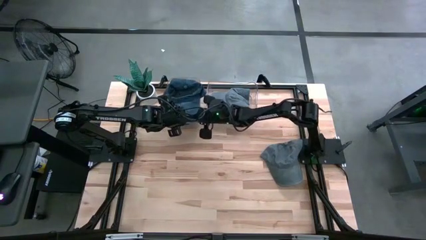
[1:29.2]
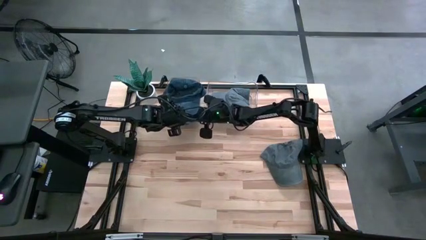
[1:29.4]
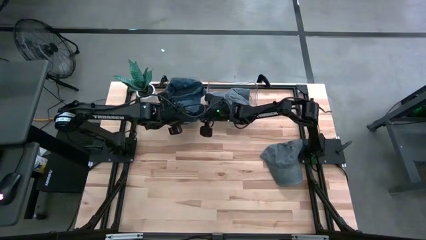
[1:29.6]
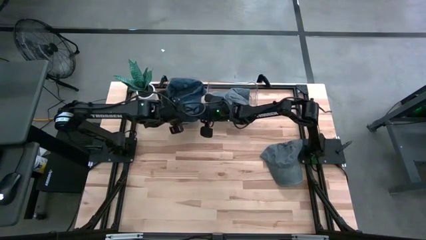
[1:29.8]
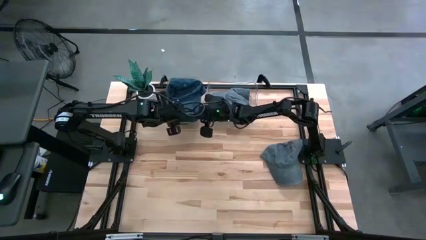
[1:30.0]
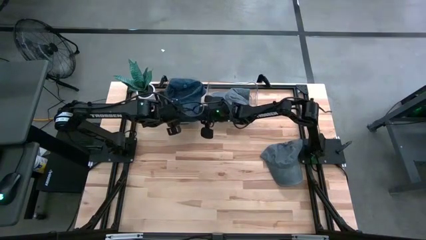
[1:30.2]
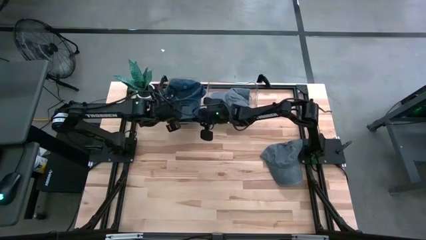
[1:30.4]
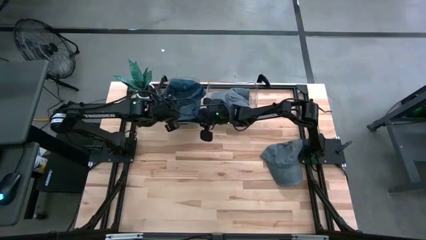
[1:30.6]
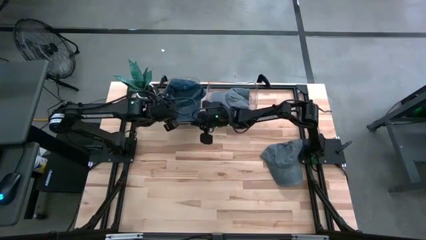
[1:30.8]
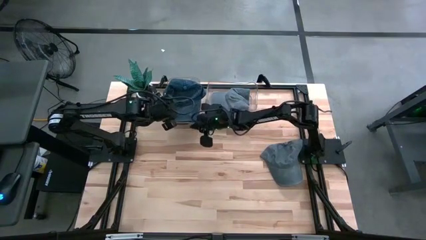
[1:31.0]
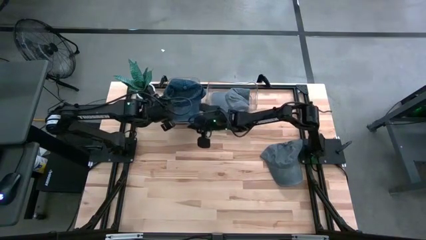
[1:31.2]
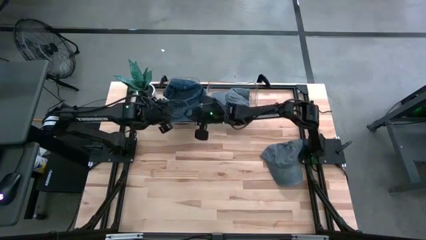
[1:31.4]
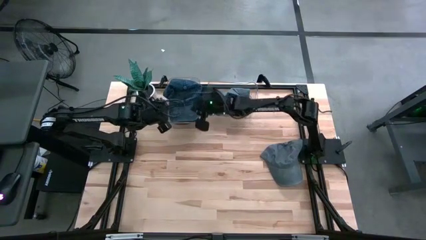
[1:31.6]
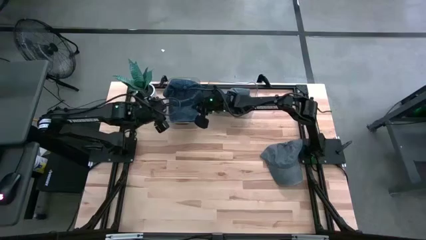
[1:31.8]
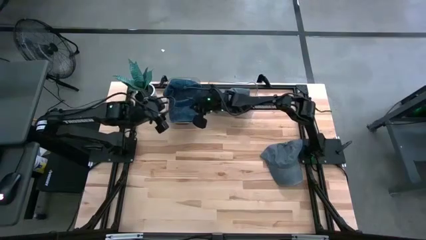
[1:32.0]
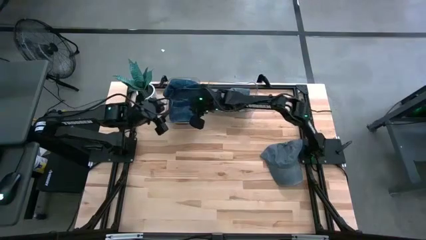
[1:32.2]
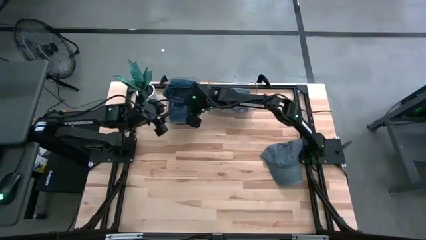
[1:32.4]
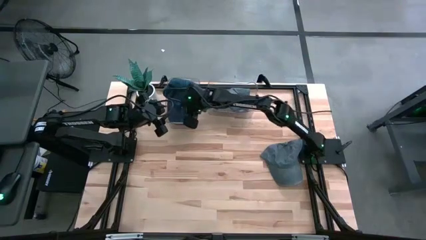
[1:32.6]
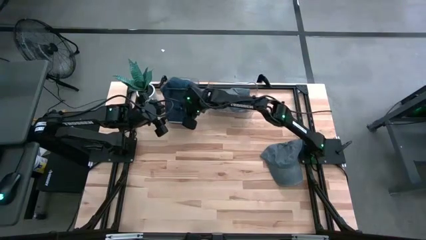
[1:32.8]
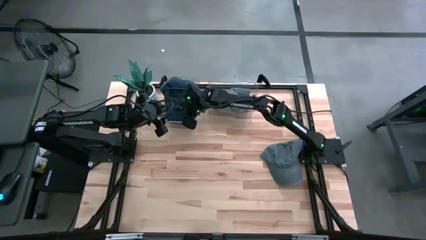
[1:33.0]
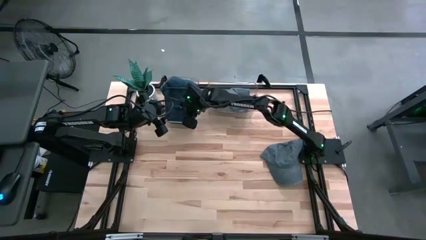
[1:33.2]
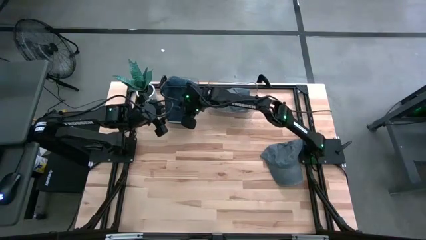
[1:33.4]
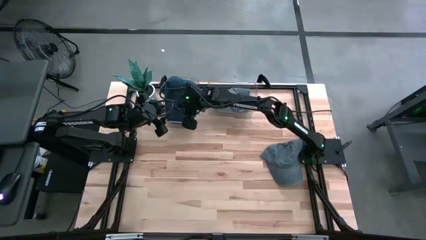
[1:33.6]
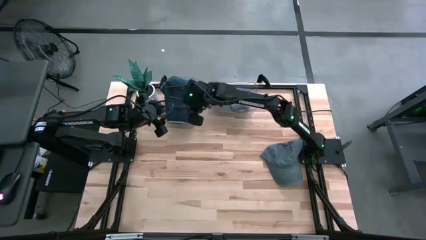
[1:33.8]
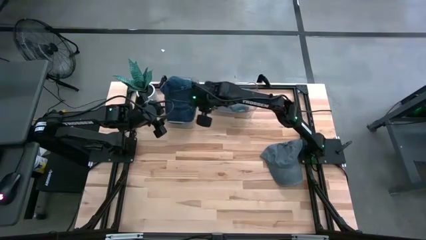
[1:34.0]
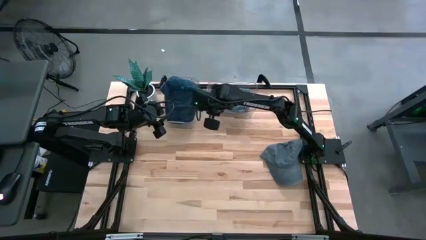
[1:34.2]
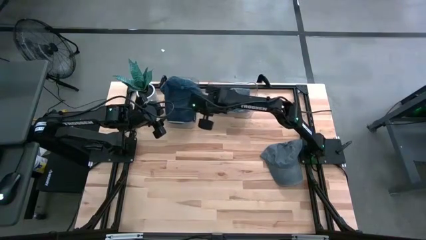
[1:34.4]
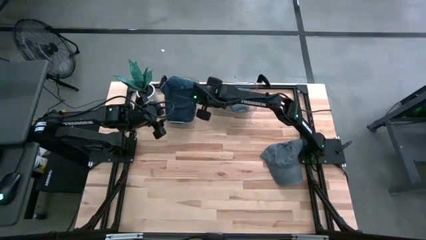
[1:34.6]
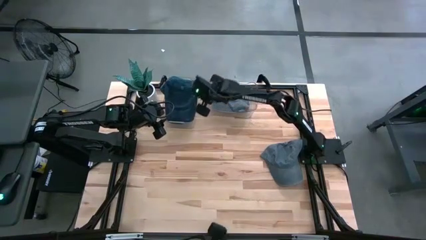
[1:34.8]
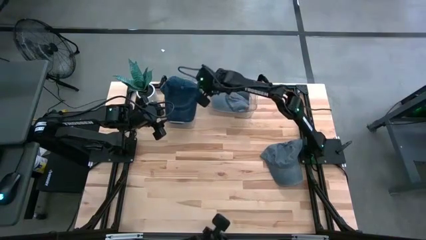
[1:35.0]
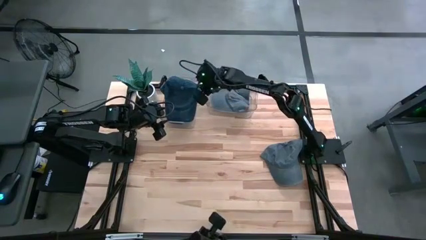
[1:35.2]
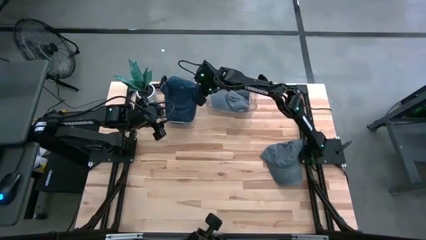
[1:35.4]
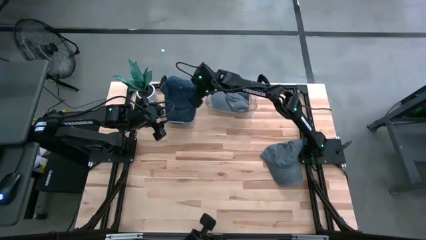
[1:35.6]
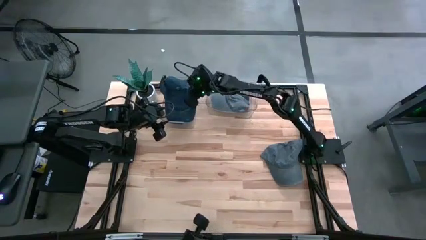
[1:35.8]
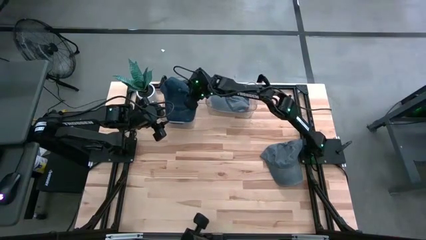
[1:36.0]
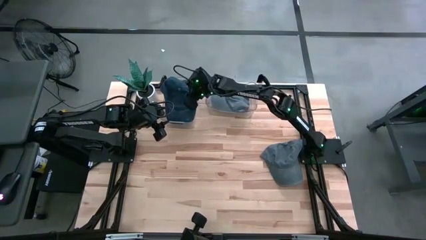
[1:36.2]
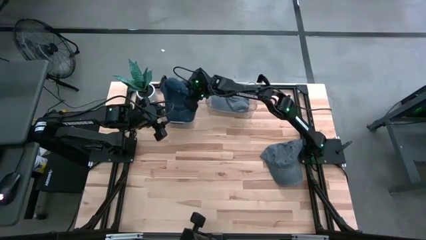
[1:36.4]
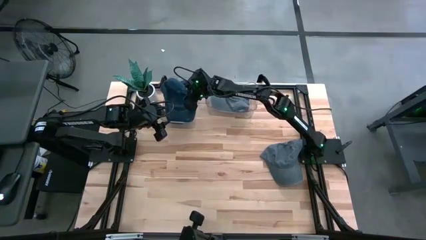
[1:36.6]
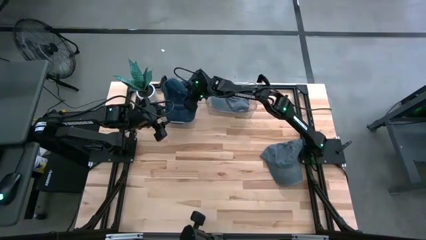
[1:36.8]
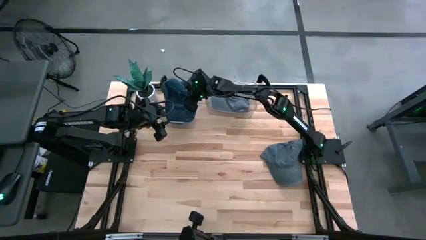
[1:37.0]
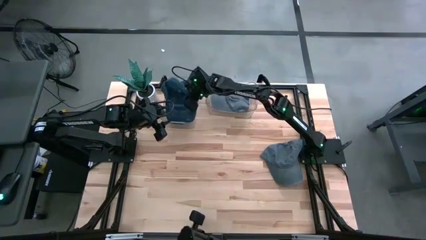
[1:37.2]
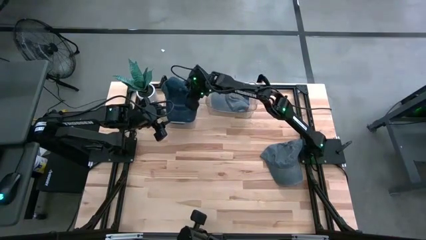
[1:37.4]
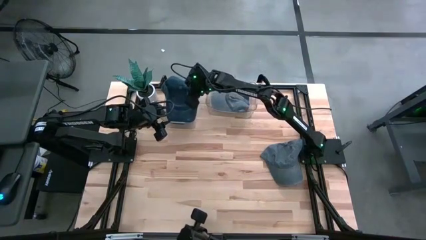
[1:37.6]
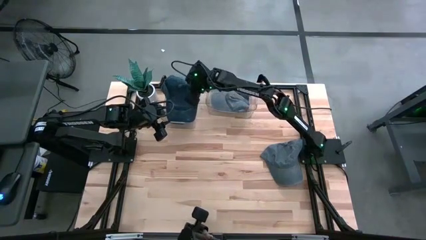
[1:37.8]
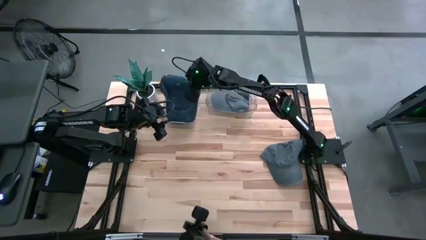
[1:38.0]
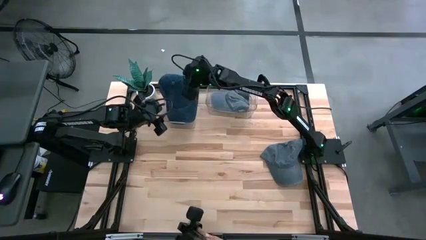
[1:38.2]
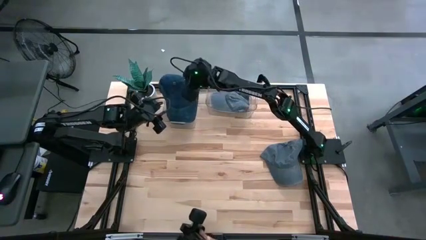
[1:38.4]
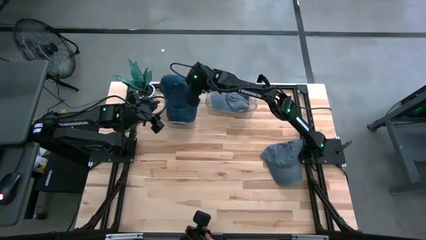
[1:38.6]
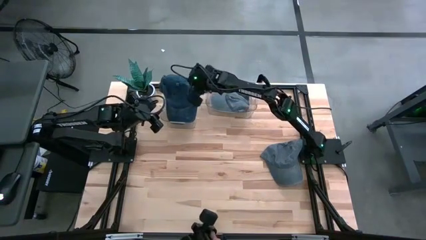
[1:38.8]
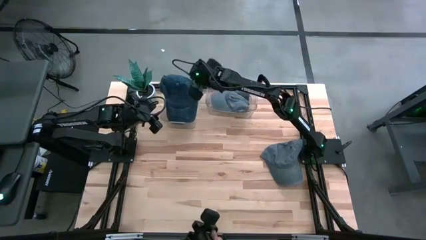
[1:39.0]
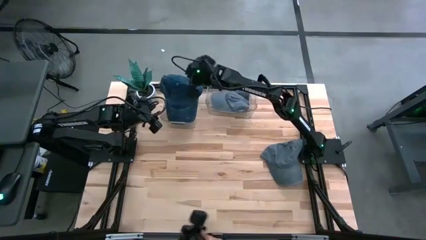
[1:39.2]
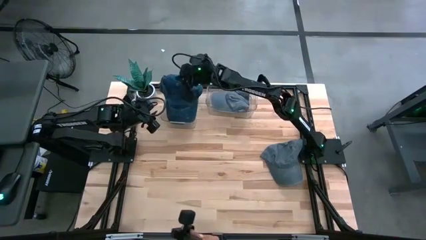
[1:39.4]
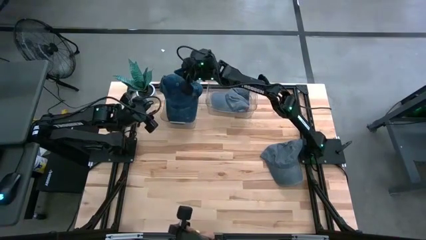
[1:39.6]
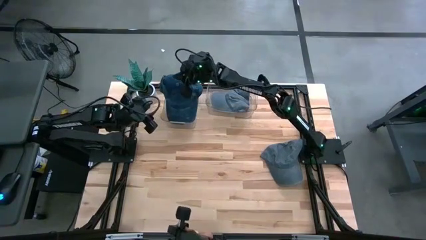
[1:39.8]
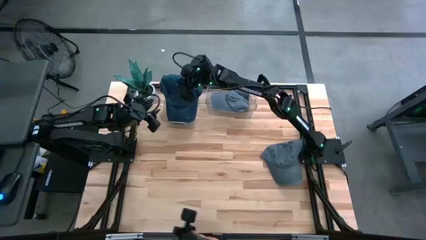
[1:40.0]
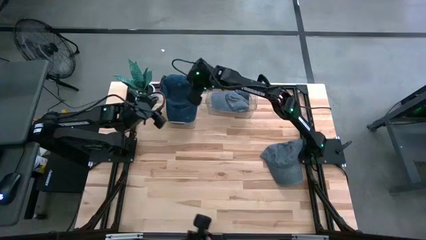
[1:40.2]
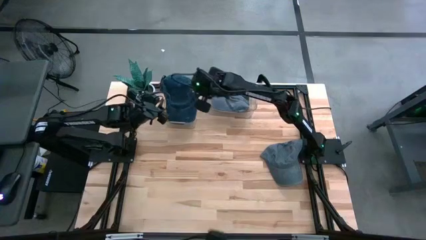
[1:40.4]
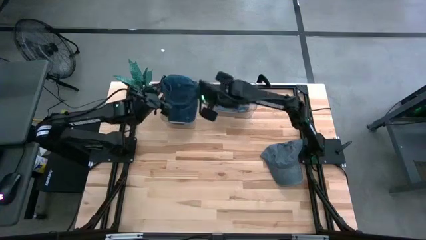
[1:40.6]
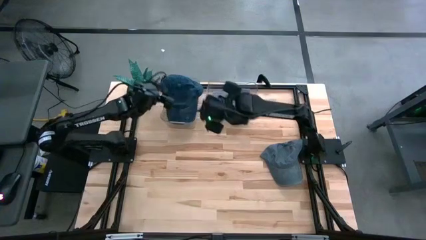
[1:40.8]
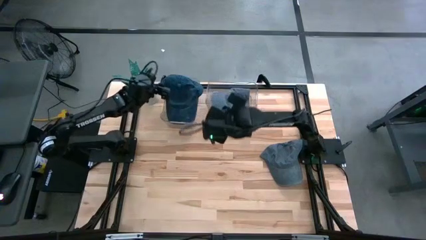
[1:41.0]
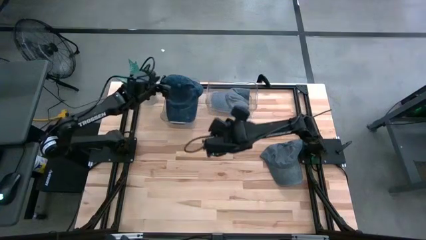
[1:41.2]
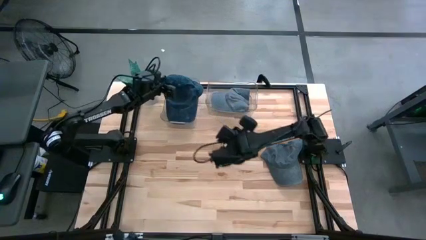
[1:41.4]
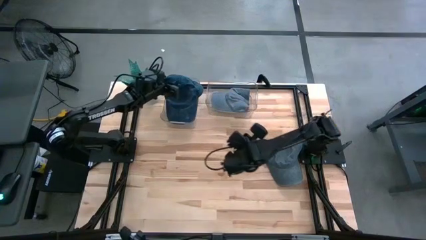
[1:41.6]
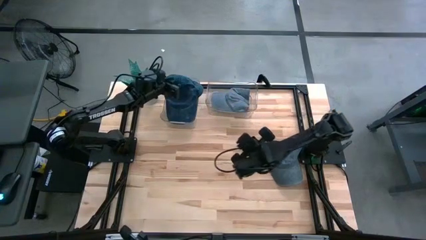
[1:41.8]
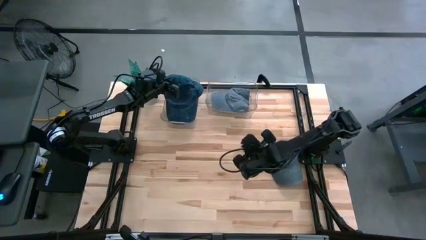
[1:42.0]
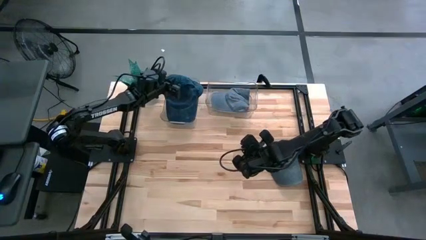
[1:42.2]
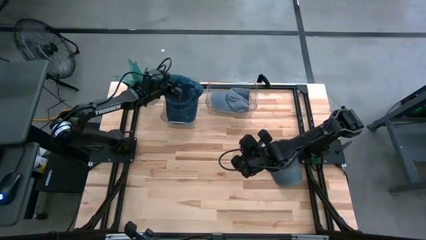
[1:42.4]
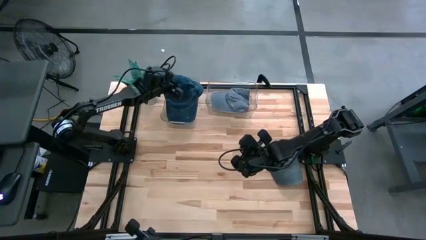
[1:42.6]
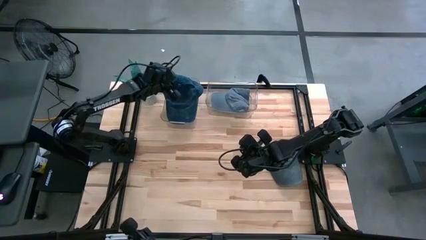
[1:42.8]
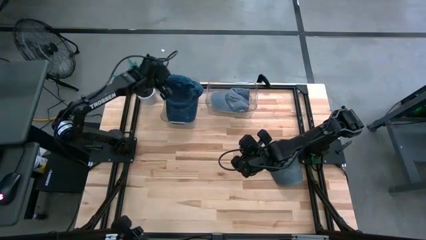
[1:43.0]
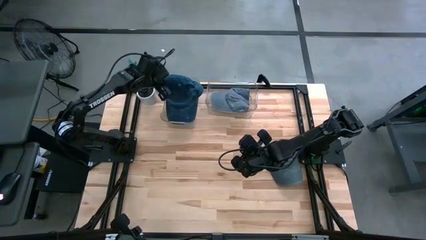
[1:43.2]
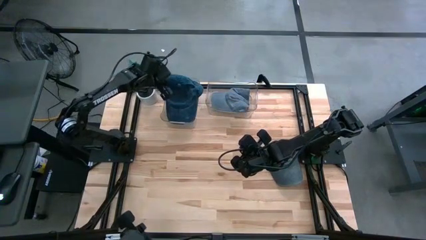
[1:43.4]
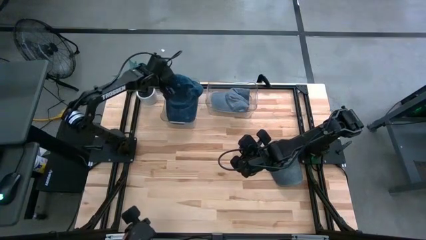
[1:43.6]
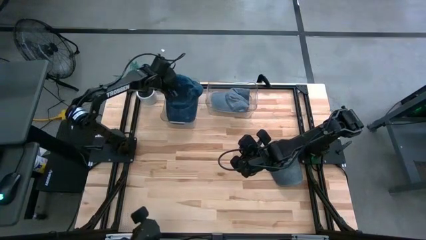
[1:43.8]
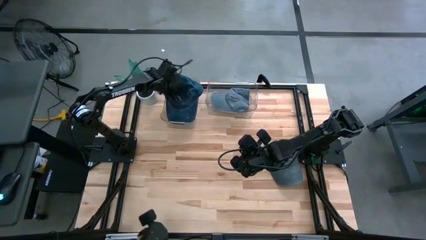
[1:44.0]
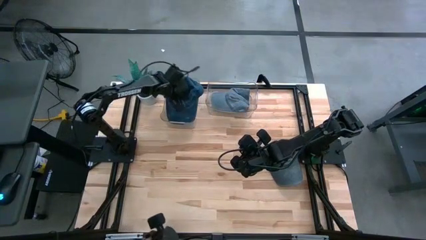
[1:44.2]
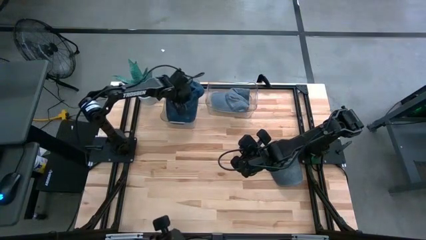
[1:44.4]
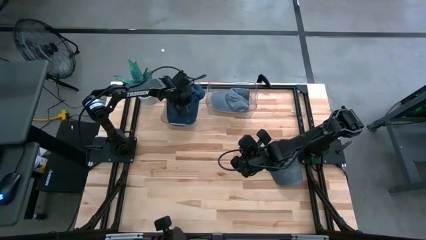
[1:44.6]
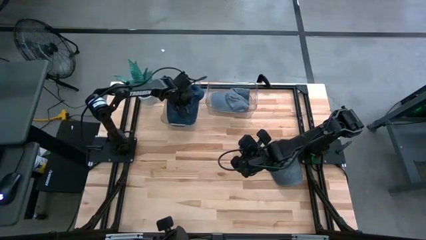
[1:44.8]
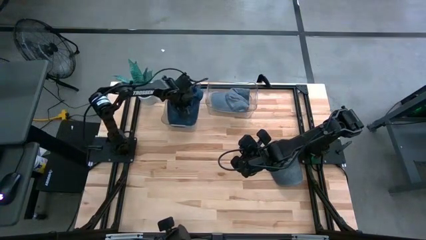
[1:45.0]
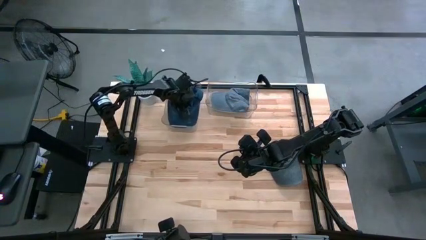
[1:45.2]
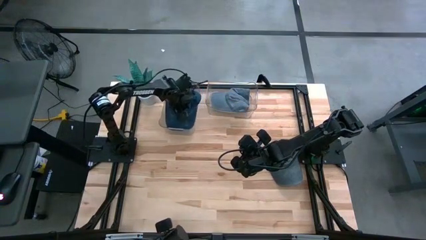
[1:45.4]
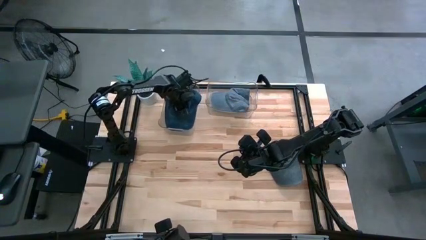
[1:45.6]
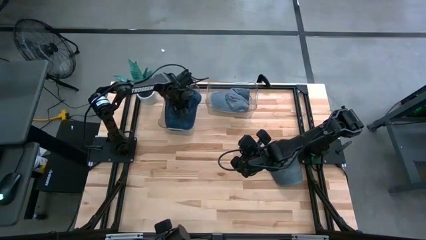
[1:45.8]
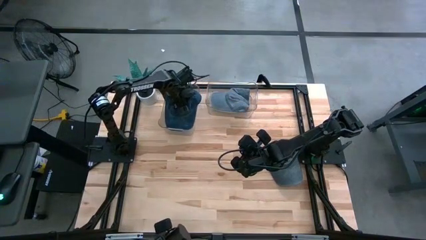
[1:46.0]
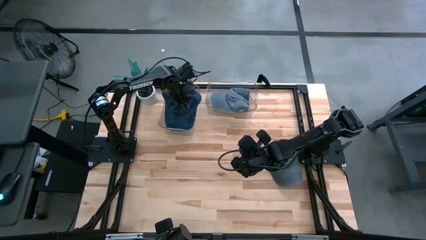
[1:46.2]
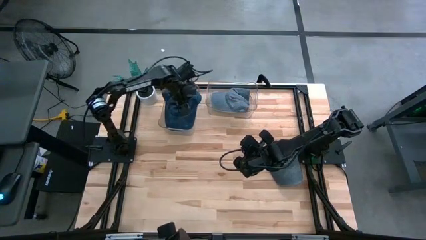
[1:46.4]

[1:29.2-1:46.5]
Task: Pick & Place hat
Put the blue cap into the left transparent bin
